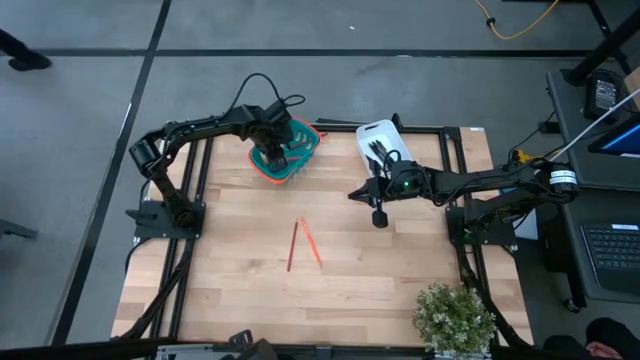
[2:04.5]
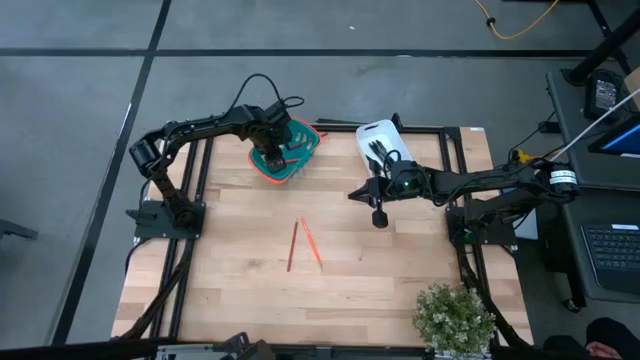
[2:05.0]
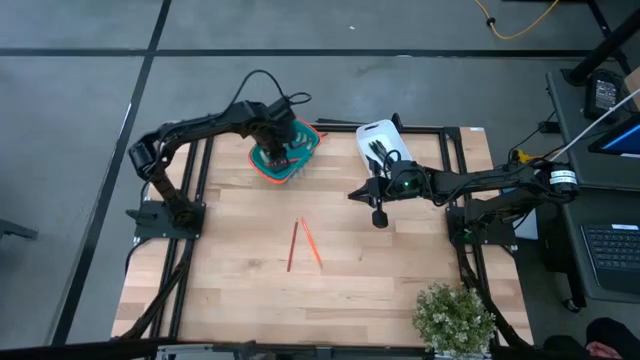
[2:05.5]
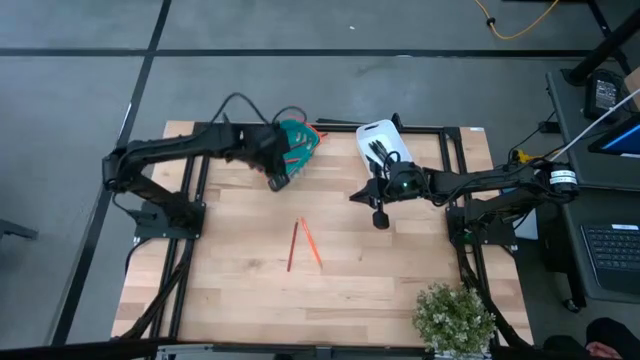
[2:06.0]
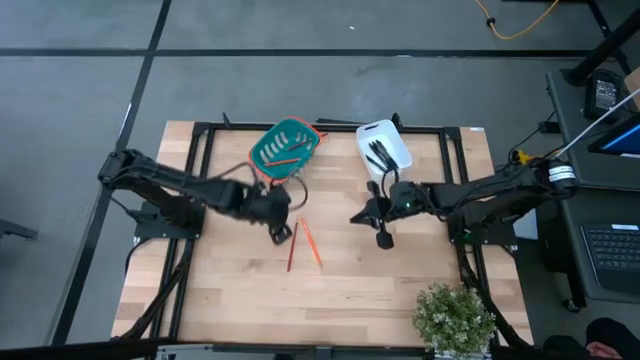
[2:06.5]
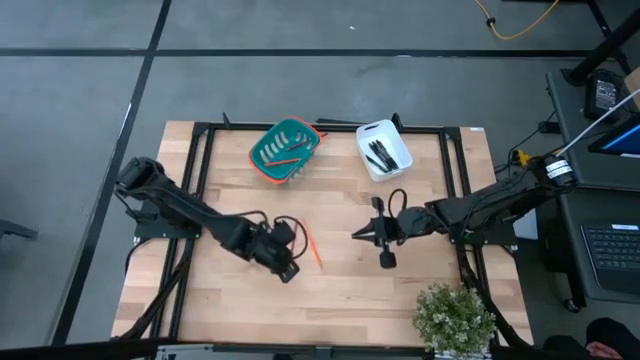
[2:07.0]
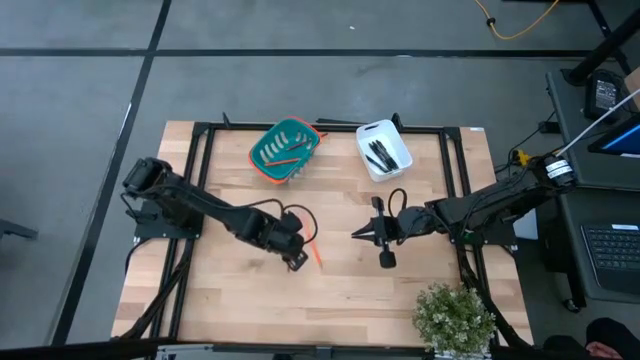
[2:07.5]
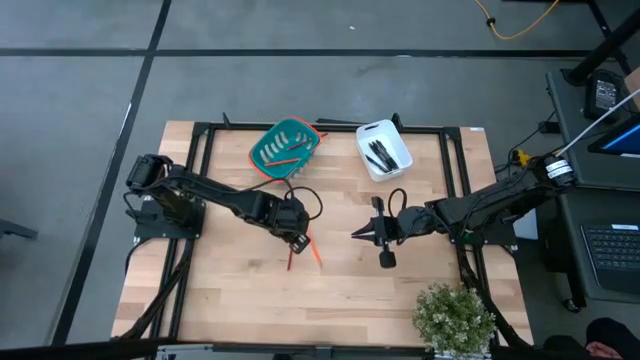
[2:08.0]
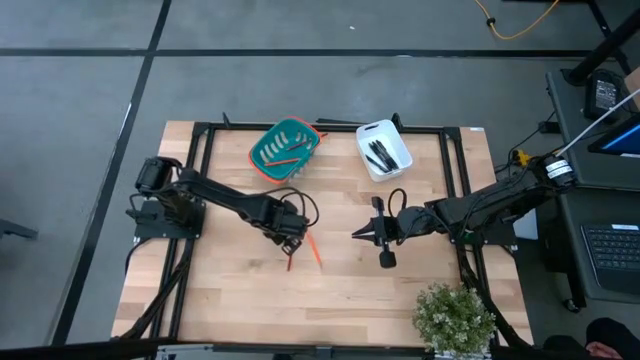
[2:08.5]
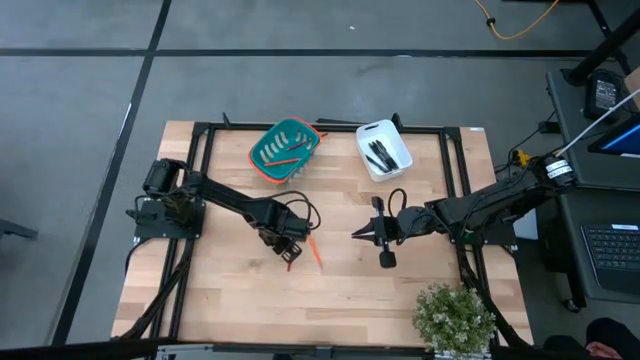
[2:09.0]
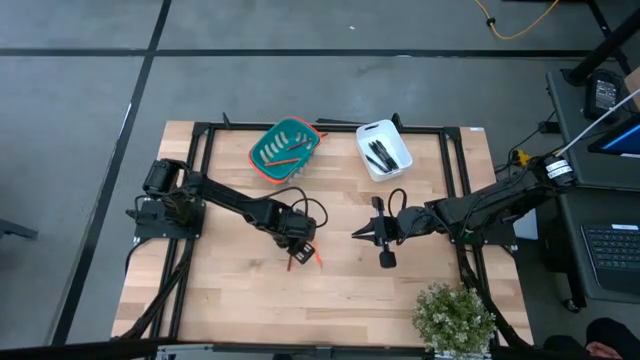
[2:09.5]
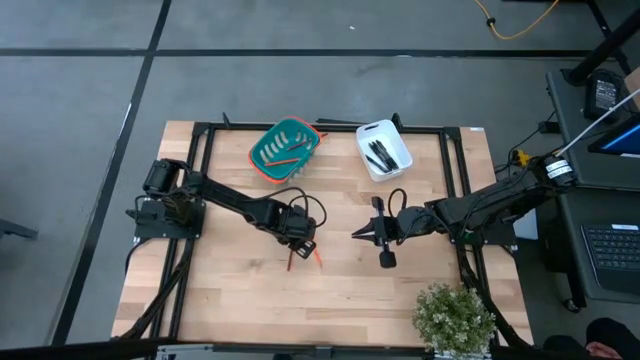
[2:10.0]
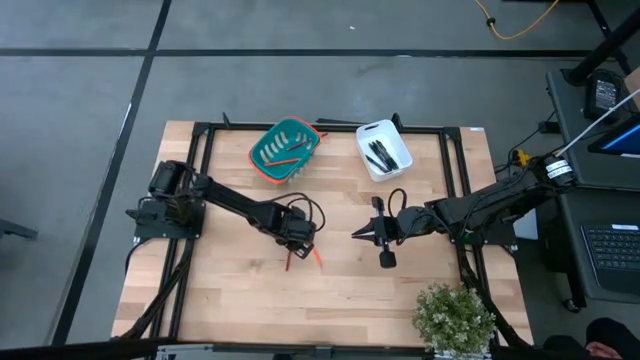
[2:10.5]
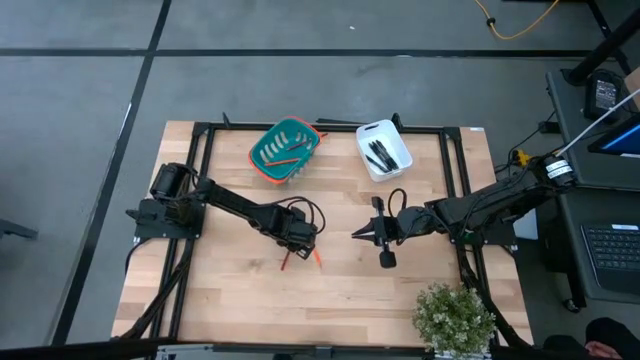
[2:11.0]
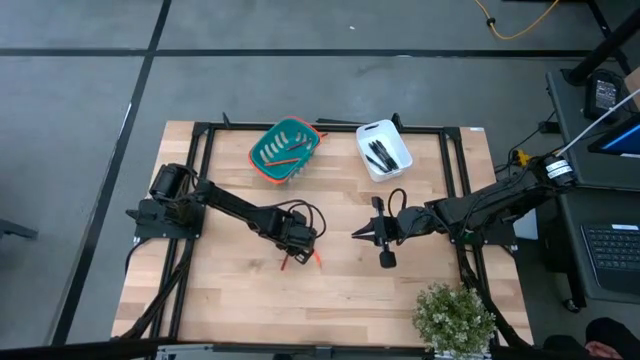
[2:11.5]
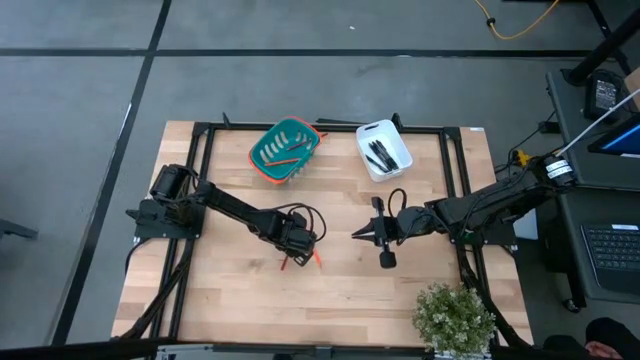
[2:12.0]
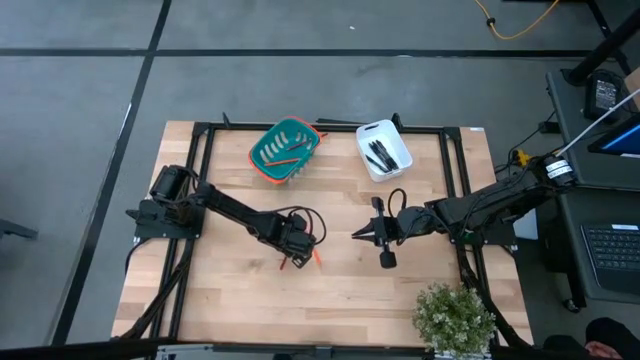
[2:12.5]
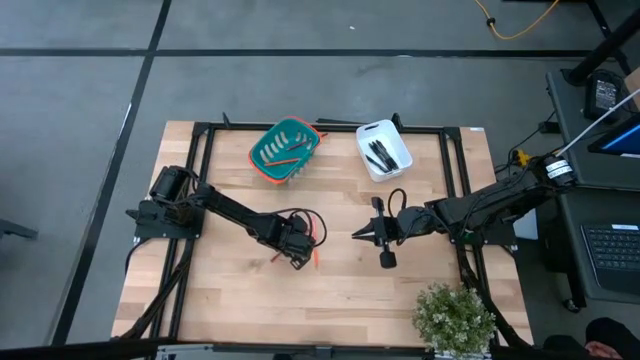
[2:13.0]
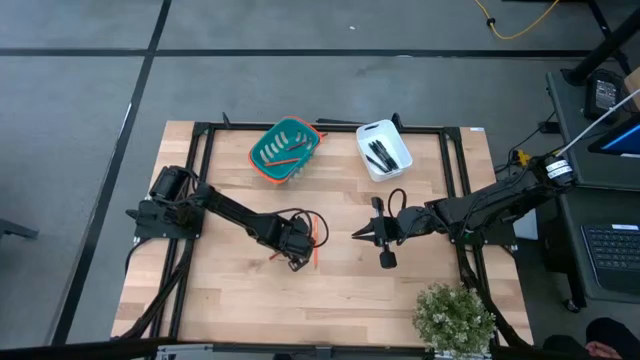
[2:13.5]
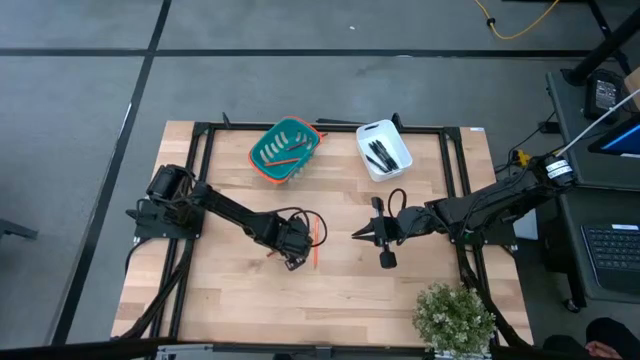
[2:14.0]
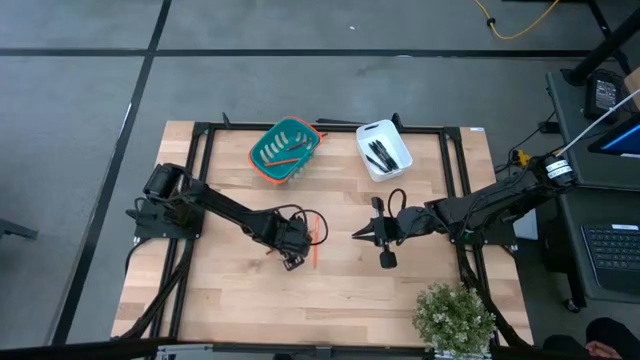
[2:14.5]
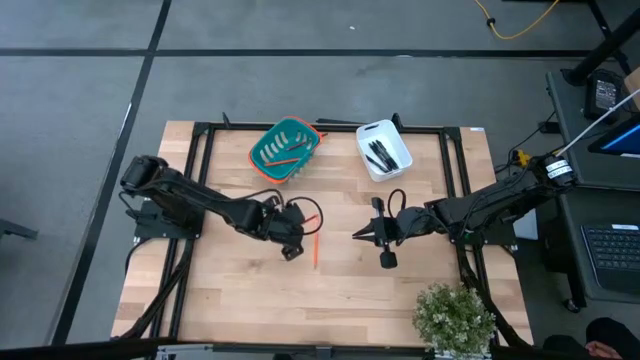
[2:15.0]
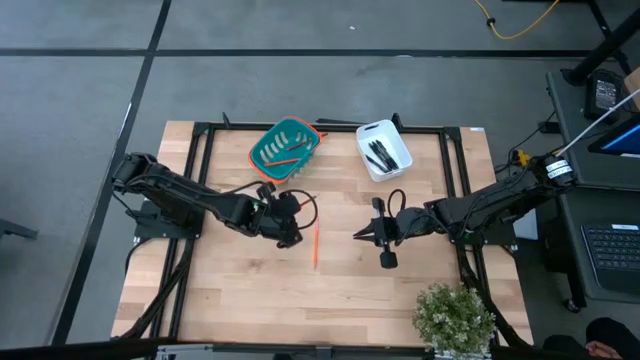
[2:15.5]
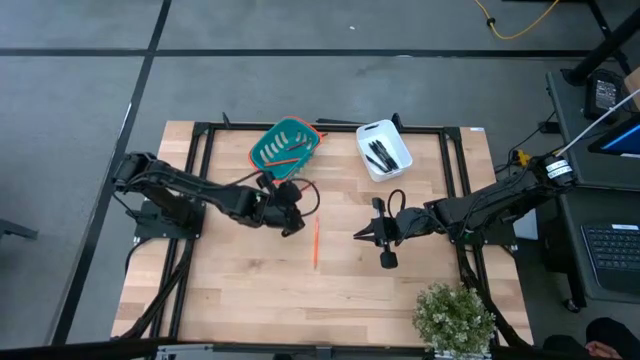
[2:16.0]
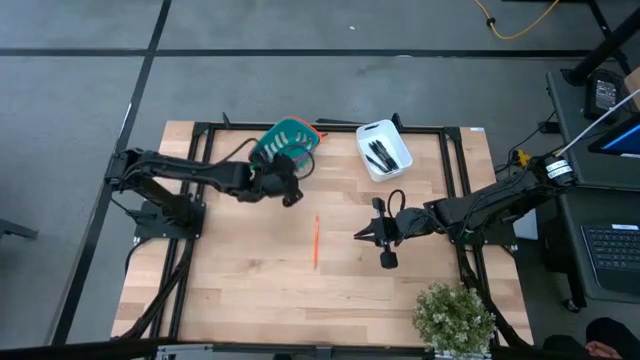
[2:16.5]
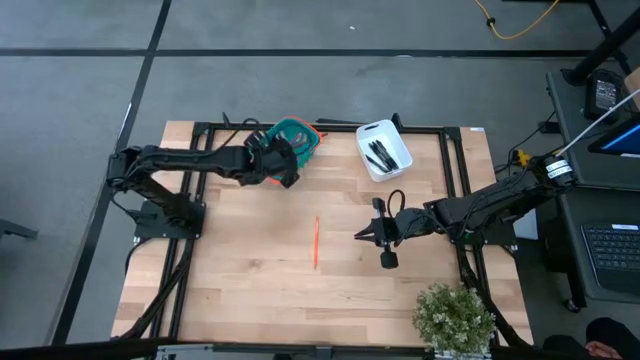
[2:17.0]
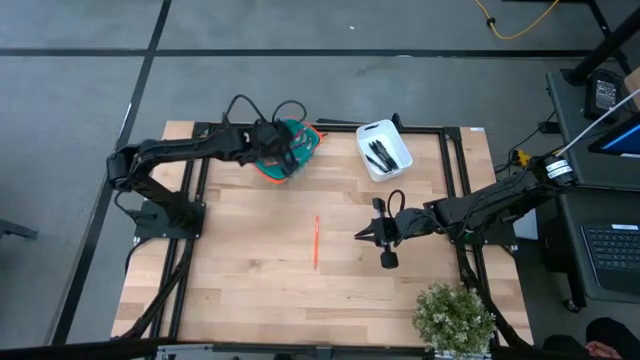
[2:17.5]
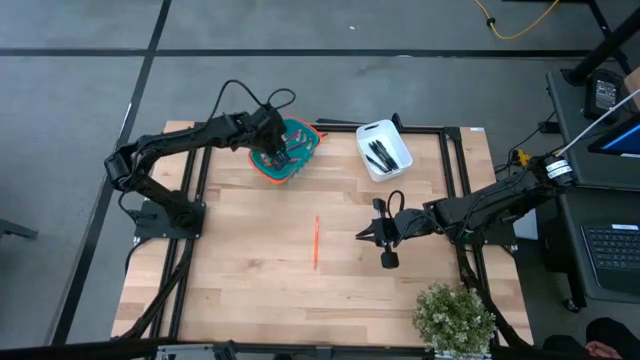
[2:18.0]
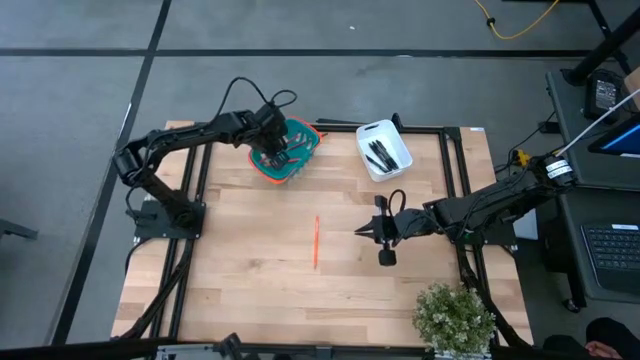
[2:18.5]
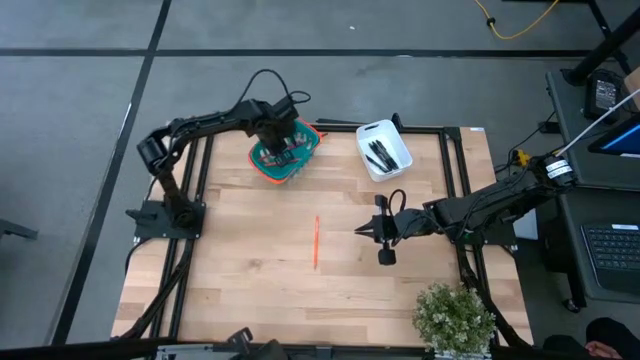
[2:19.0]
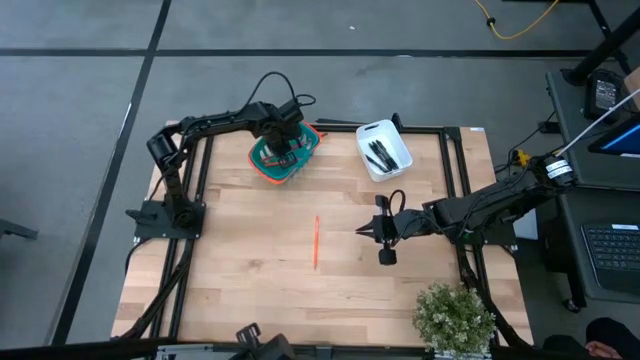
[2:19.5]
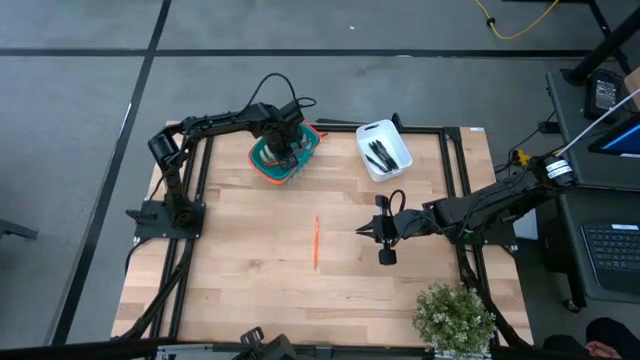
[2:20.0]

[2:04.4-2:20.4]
Task: Sort pens & pencils
Put the red pencil into the blue bin

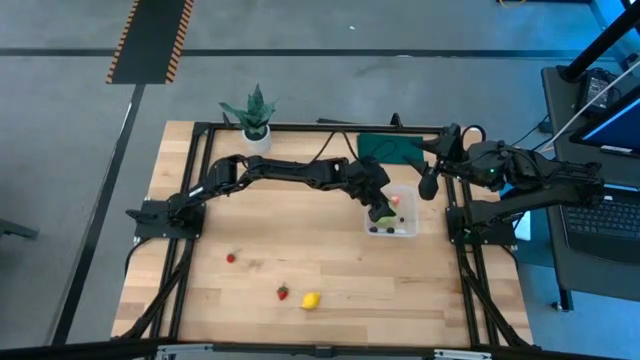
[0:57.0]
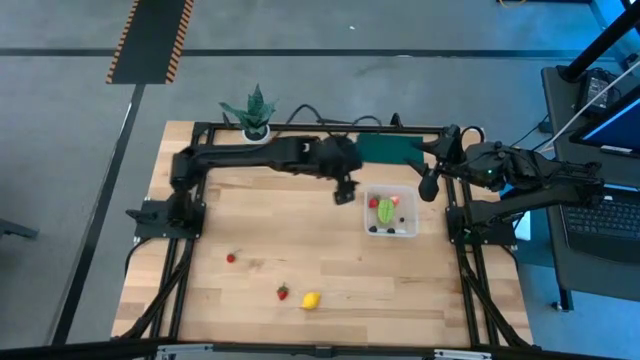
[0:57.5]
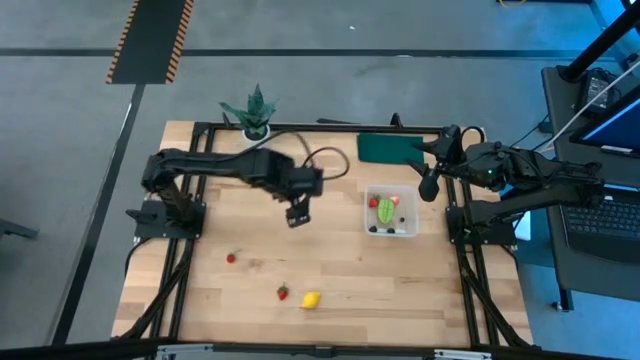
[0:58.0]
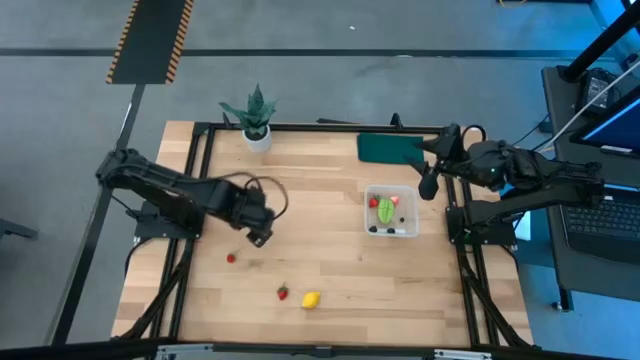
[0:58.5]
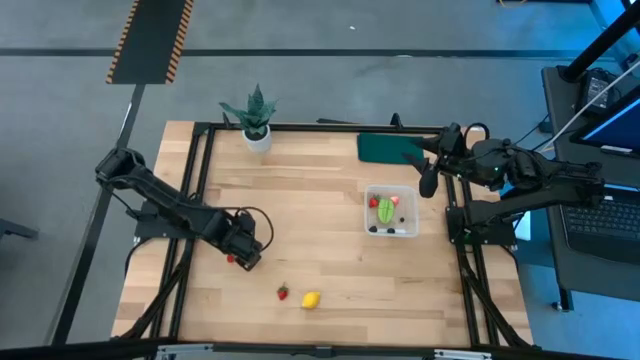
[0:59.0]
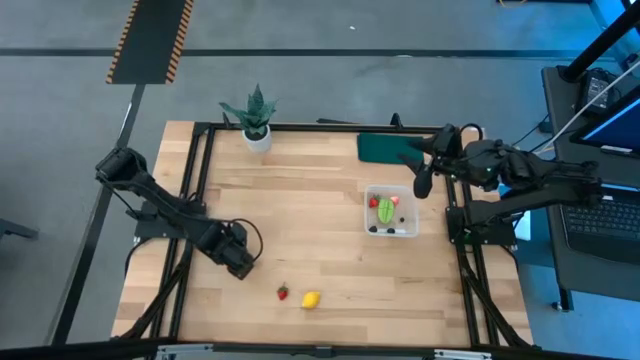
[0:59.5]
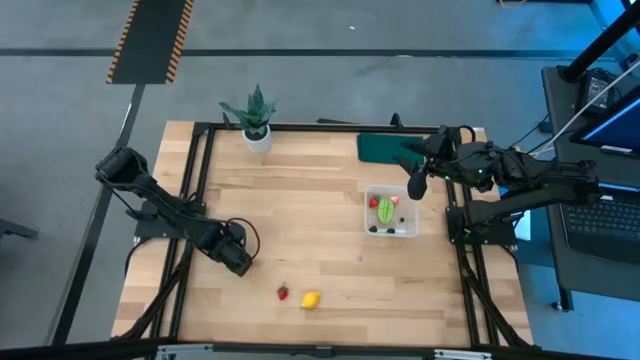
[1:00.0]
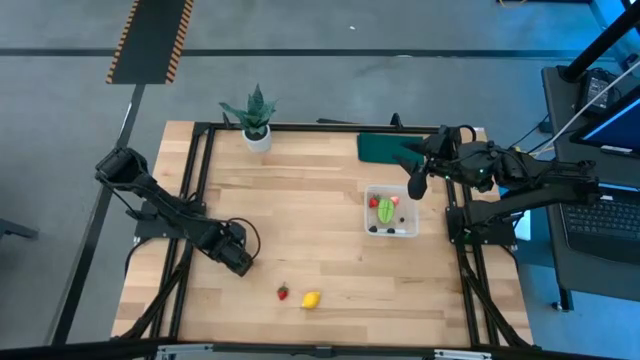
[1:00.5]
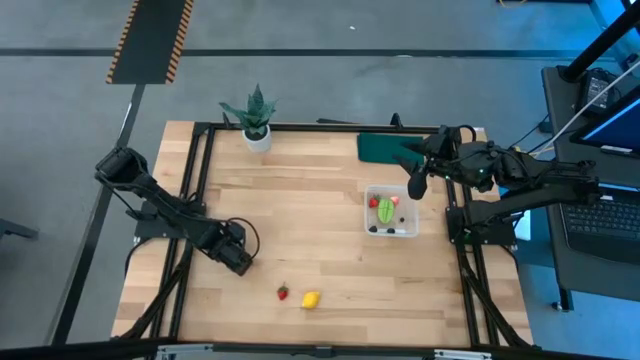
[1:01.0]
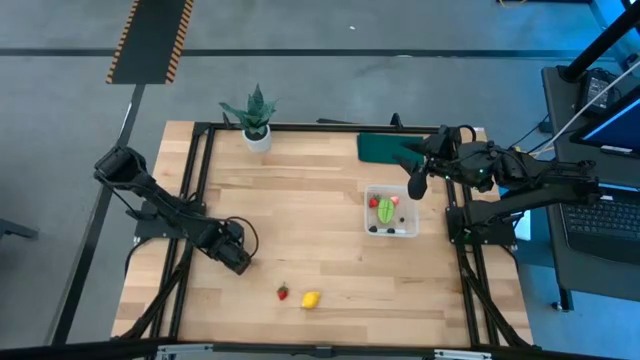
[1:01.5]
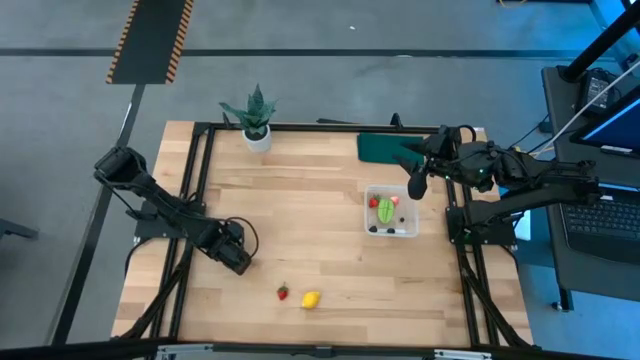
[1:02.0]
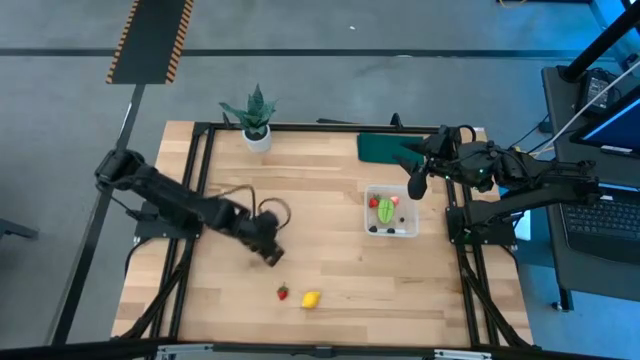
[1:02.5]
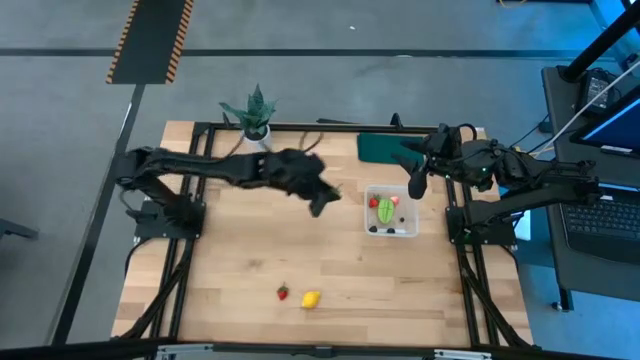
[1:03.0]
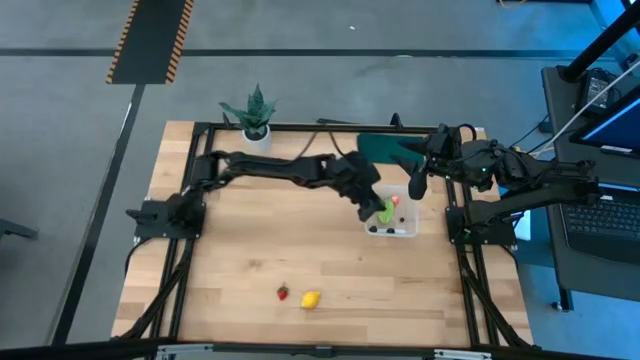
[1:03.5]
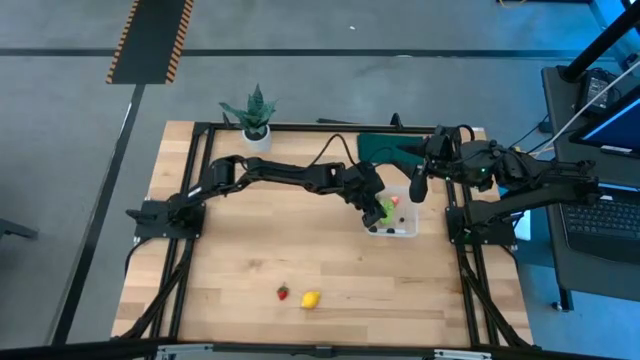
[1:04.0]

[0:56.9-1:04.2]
Task: Pick and placing Produce into tupperware
Put the left red strawberry into the transparent container
